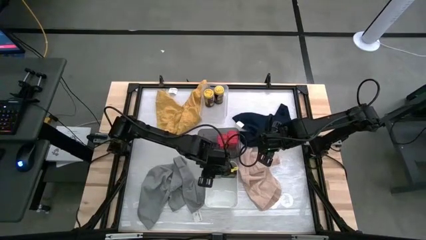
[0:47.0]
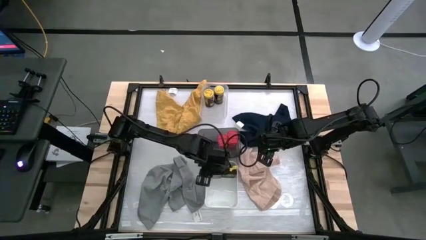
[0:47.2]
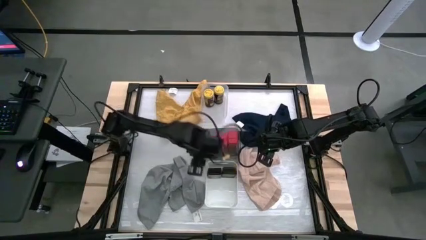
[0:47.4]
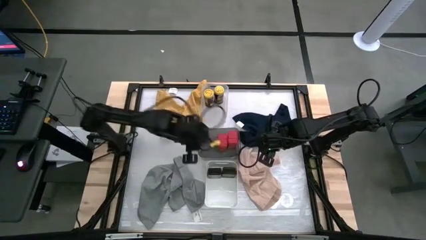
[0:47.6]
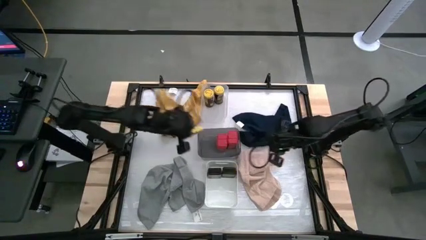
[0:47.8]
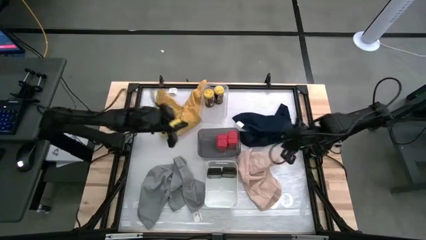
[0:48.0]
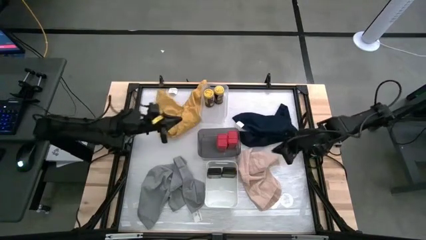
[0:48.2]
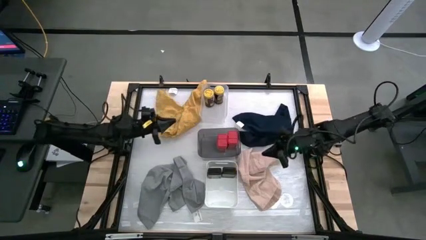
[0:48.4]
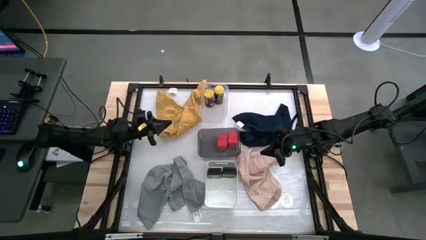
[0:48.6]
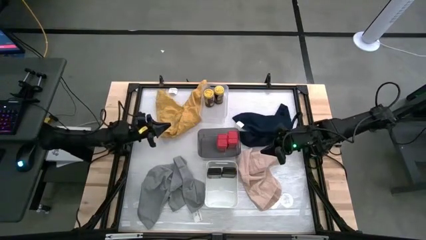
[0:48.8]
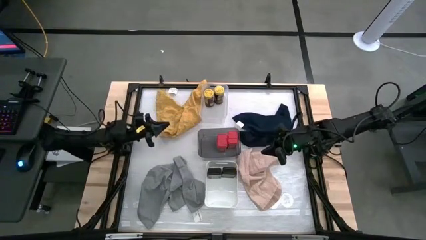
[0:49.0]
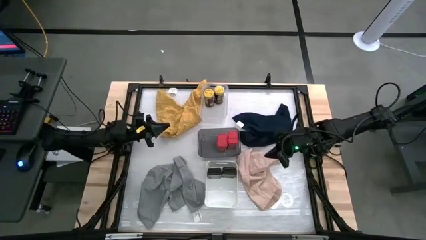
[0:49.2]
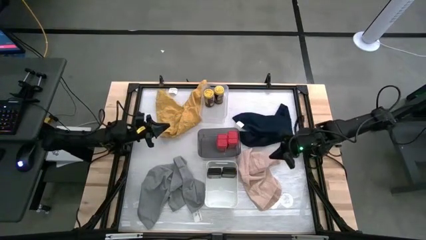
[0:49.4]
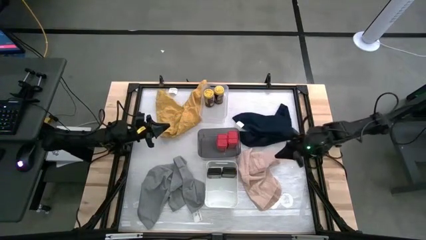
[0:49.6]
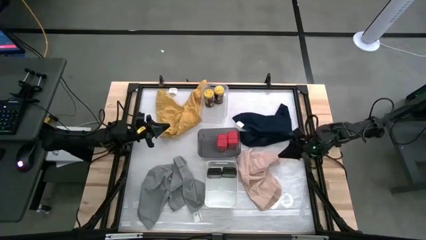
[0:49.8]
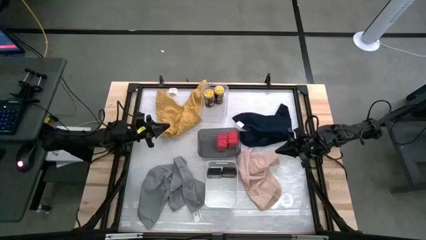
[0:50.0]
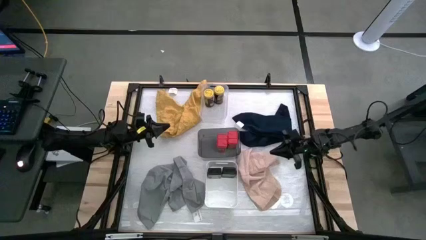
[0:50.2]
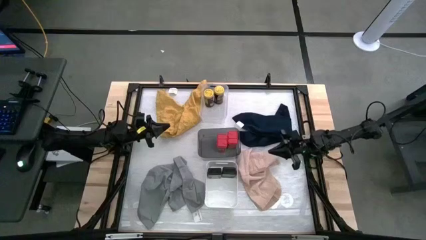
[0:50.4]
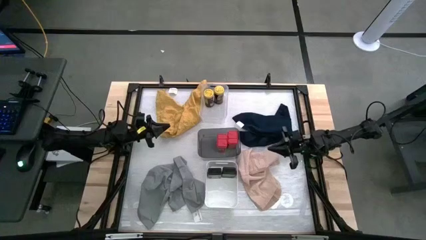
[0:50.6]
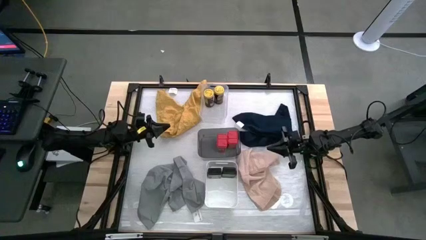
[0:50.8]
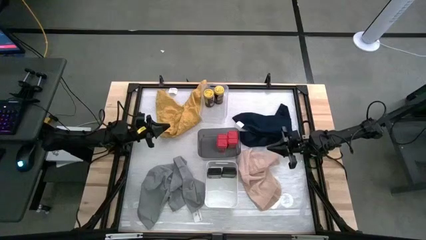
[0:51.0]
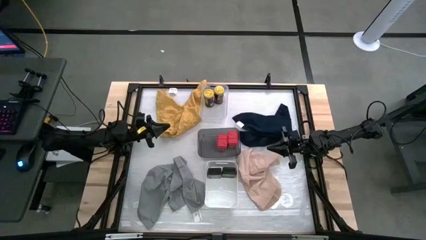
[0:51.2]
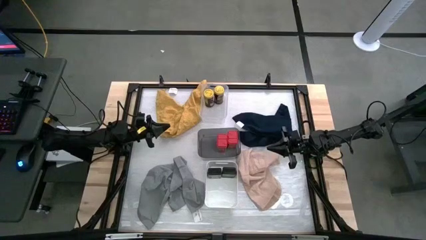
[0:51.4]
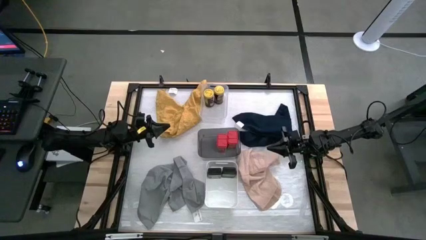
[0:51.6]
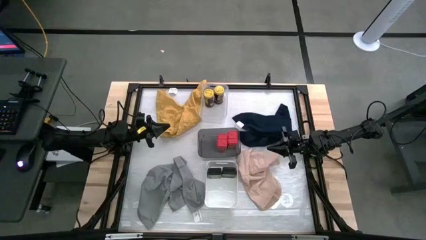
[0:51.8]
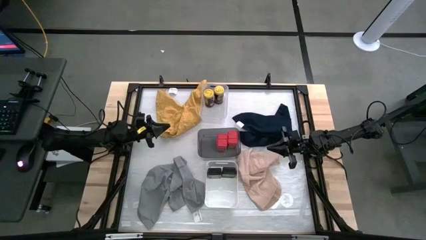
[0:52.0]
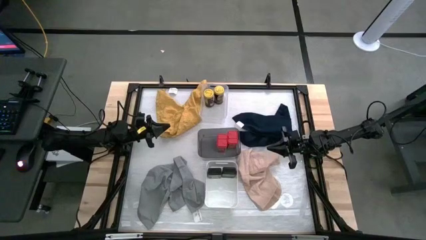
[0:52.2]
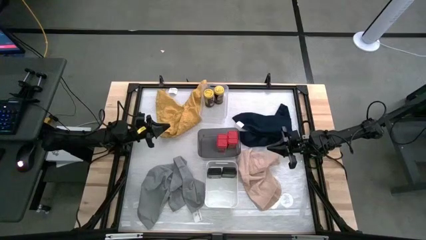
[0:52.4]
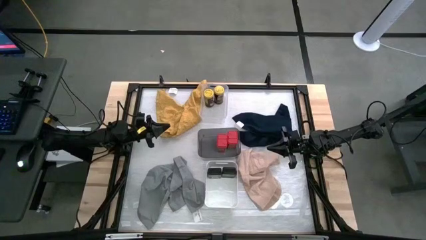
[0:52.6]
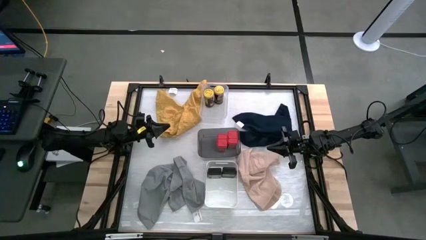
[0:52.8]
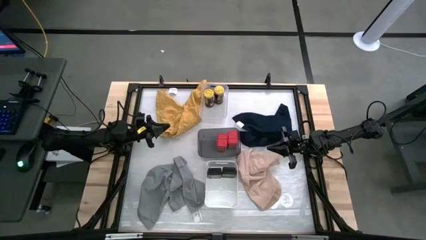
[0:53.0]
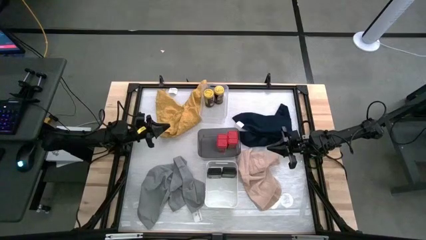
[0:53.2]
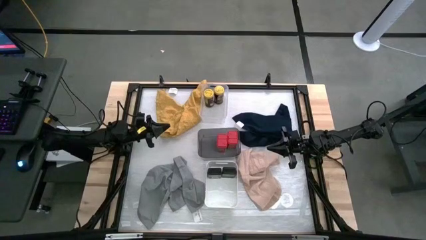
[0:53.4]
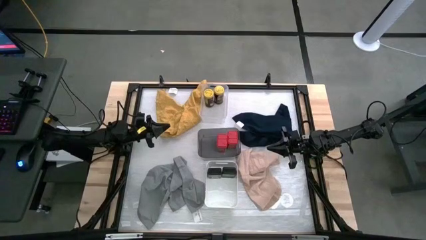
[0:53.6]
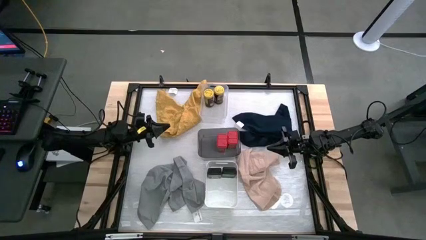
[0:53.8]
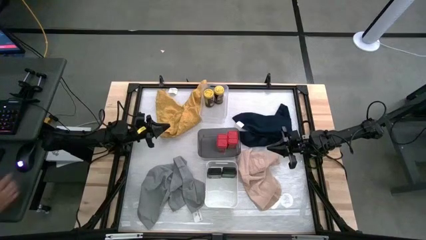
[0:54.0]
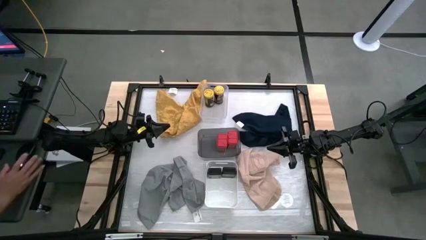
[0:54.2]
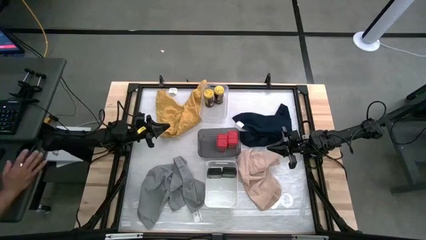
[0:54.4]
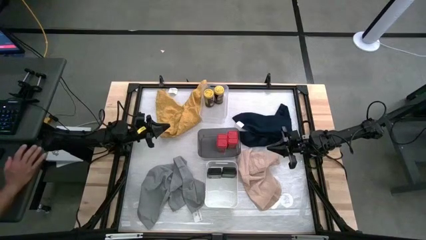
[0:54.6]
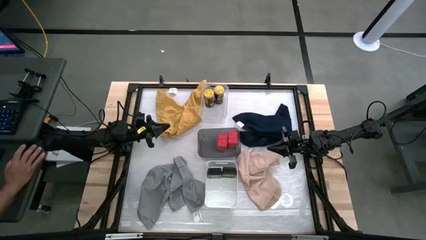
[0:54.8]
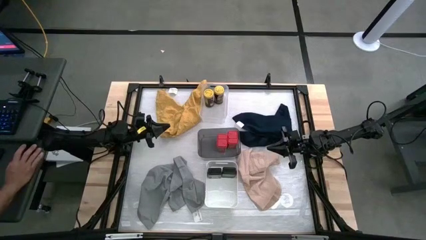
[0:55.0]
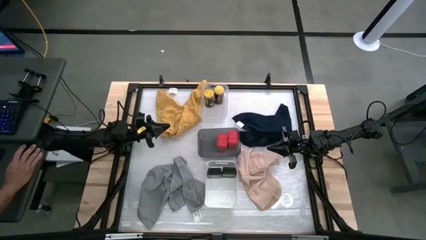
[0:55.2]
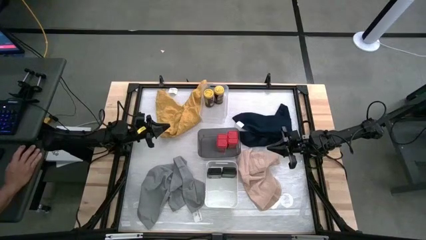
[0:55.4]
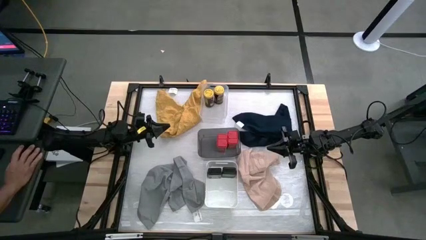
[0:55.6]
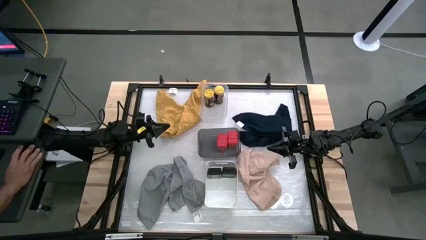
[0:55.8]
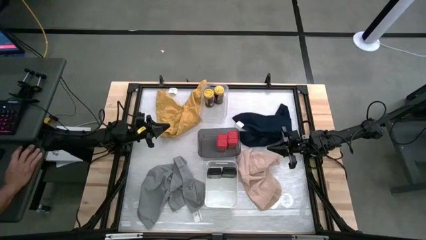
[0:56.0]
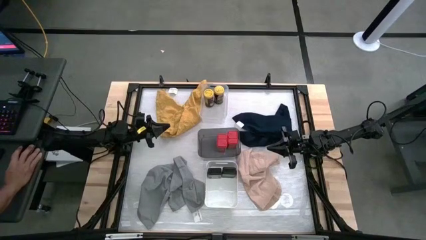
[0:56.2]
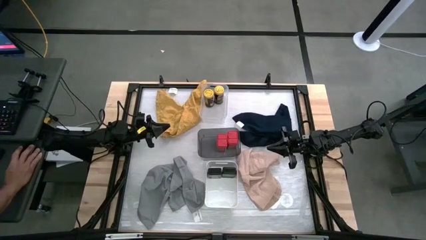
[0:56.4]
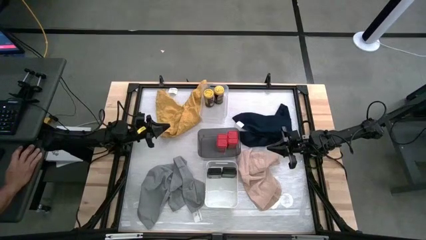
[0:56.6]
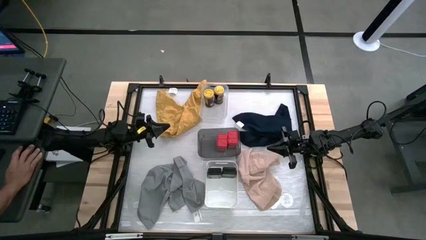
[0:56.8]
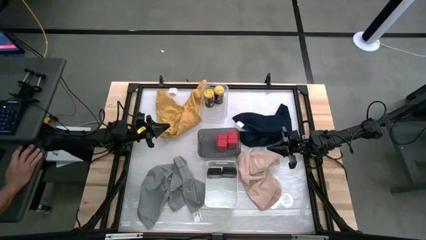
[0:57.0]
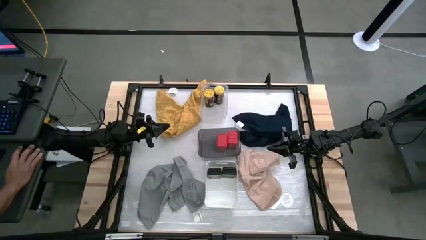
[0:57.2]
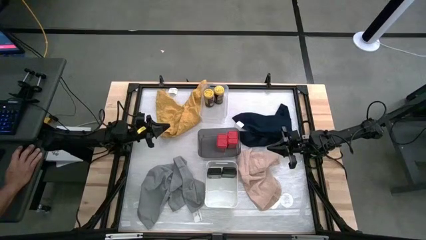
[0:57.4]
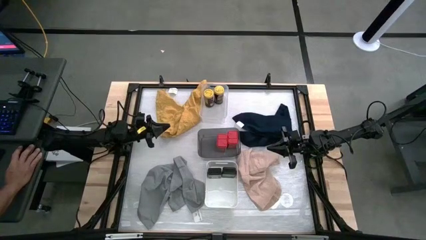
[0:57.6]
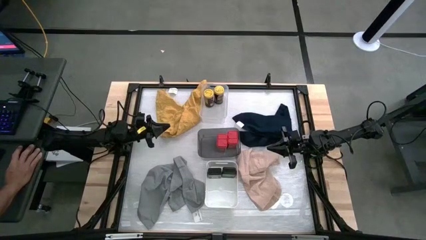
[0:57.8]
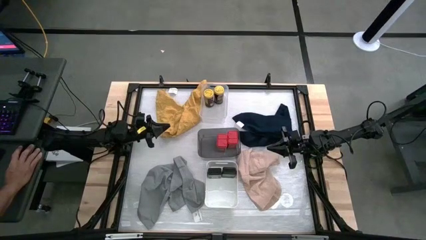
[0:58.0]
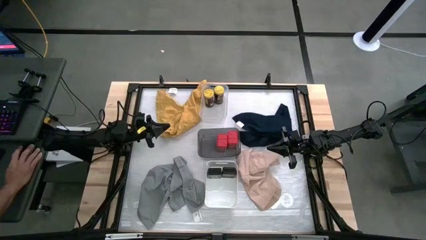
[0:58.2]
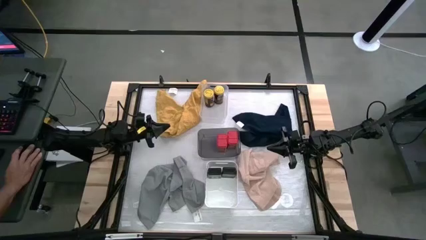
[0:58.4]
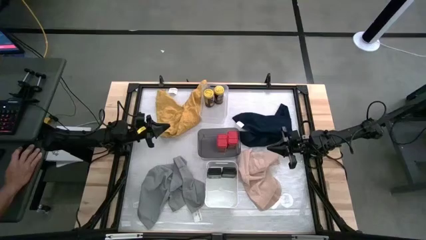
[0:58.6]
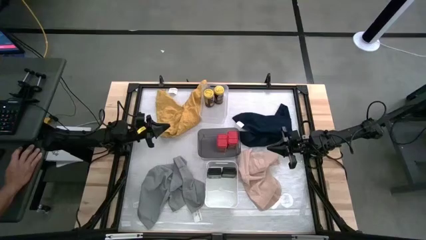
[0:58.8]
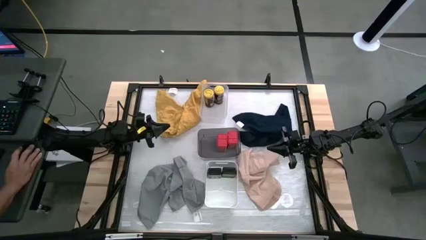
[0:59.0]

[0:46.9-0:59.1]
Task: Sort spices by type
Return to Home Position
